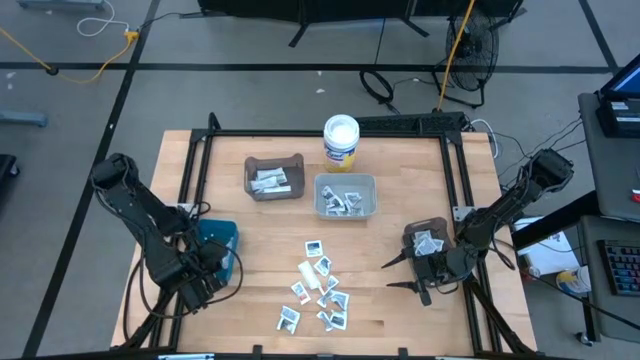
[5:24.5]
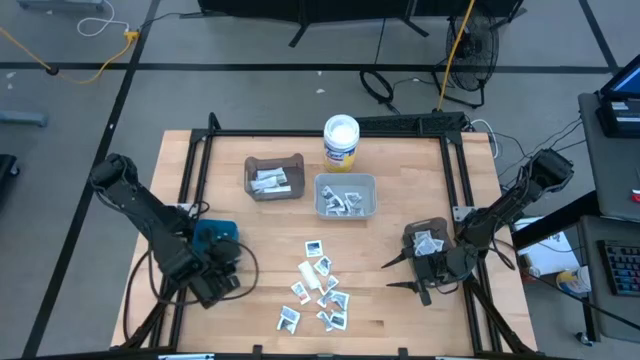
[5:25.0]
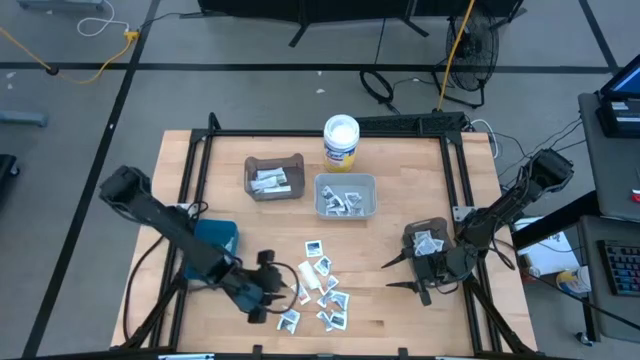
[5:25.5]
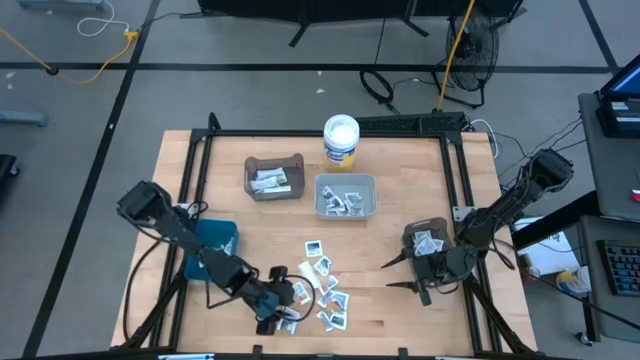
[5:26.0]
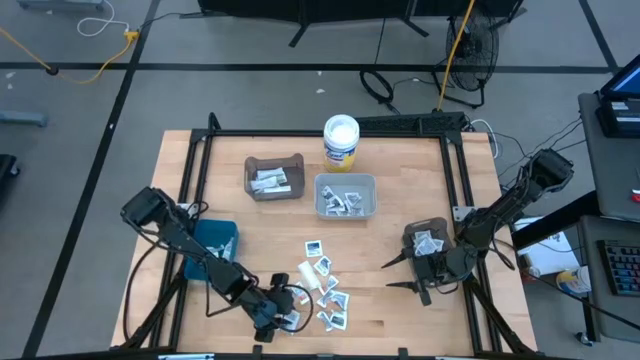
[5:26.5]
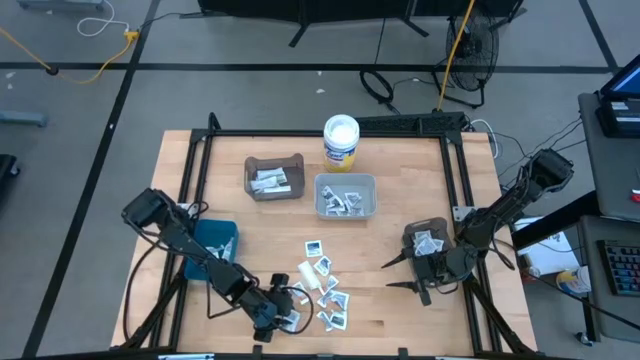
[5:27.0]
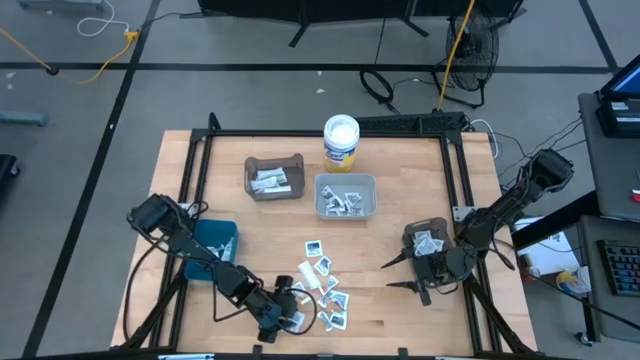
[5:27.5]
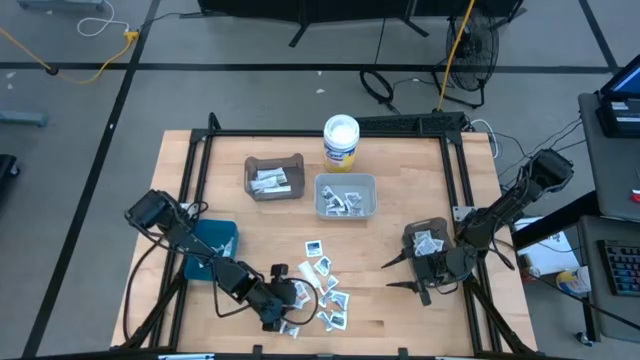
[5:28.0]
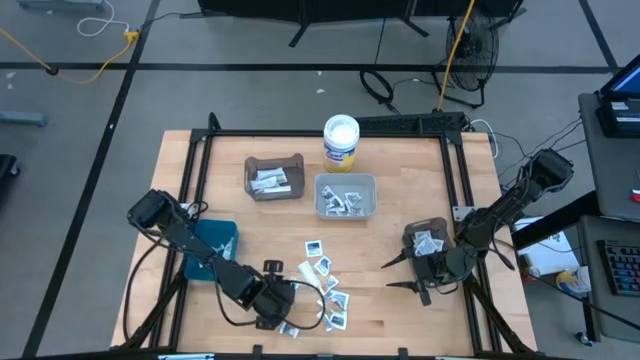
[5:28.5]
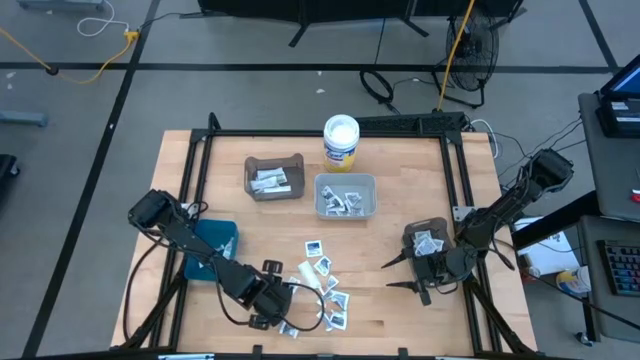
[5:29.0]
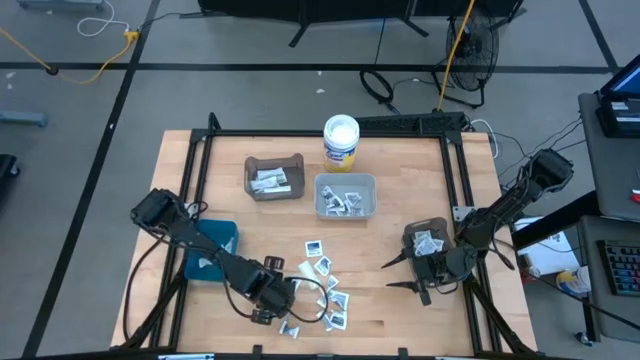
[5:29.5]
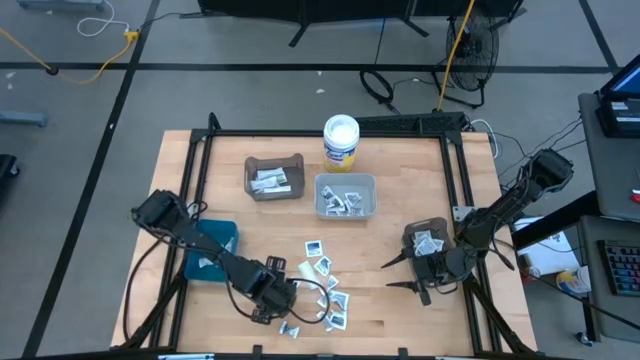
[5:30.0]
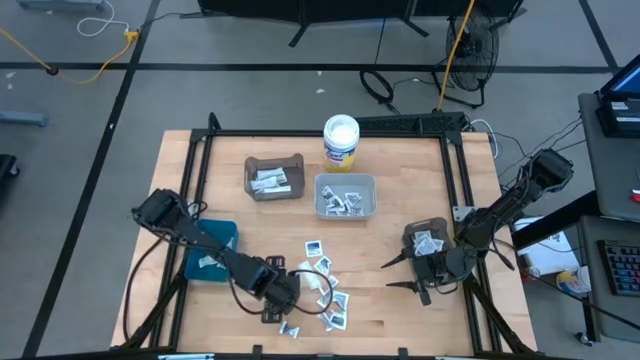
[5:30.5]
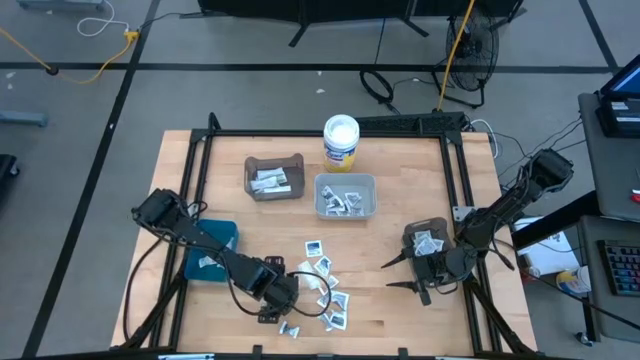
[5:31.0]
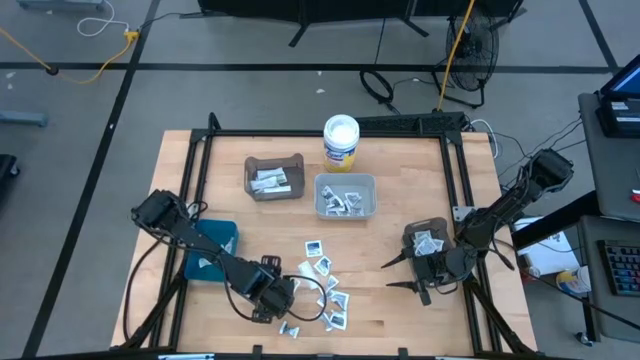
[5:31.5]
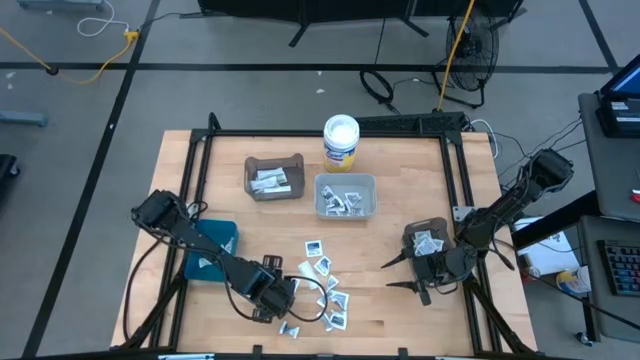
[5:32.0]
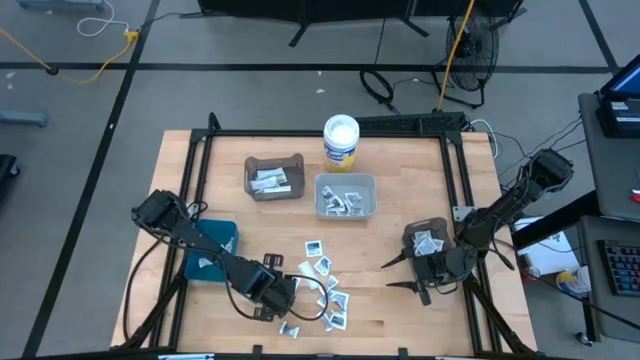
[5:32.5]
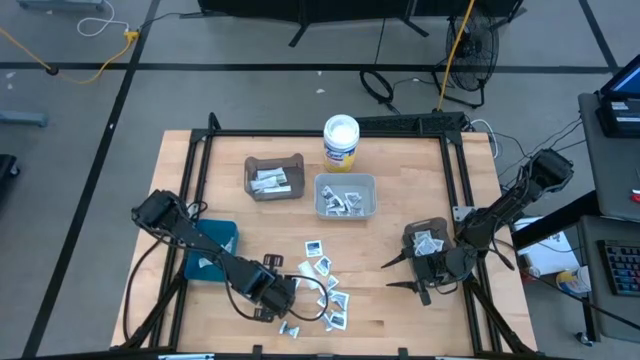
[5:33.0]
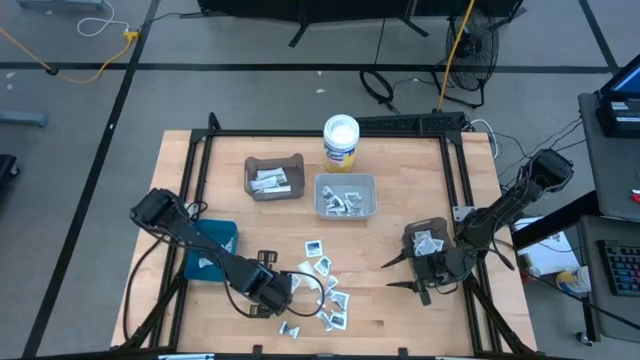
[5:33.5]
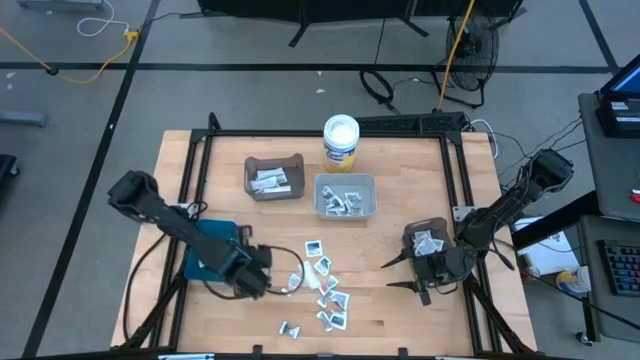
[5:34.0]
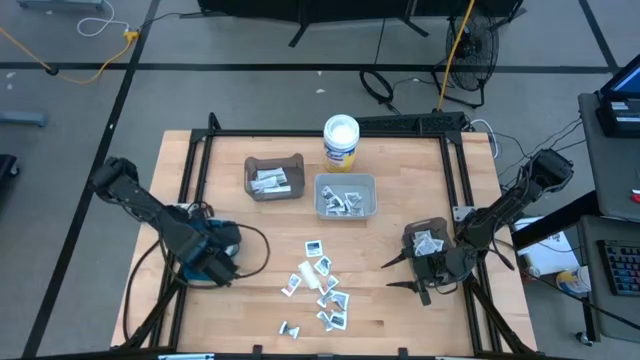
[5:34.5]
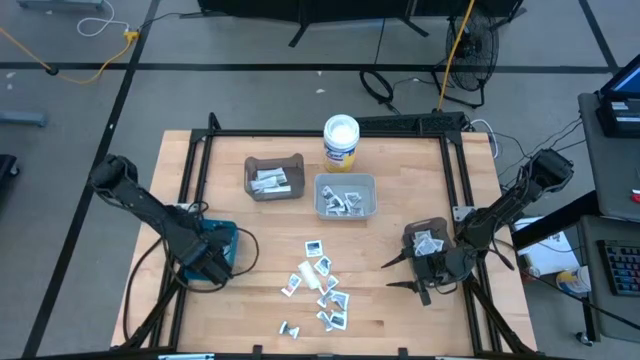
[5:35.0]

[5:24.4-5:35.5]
Task: Pick & Place First Aid Supplies
Put the orange ointment pack into the blue bin

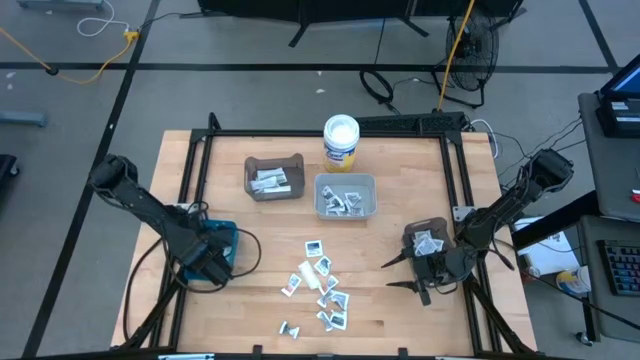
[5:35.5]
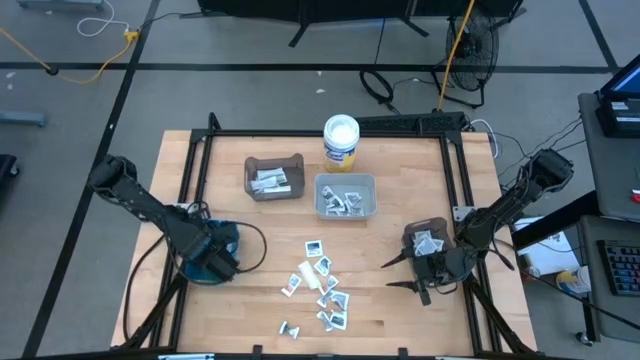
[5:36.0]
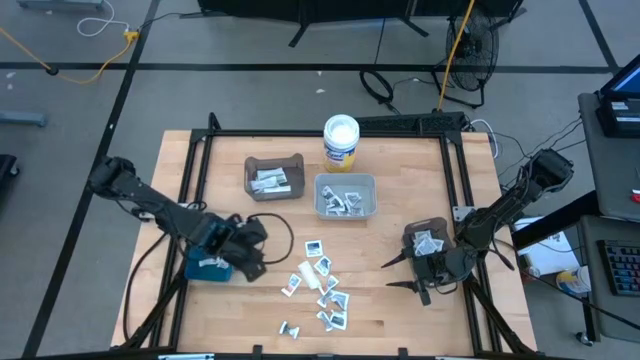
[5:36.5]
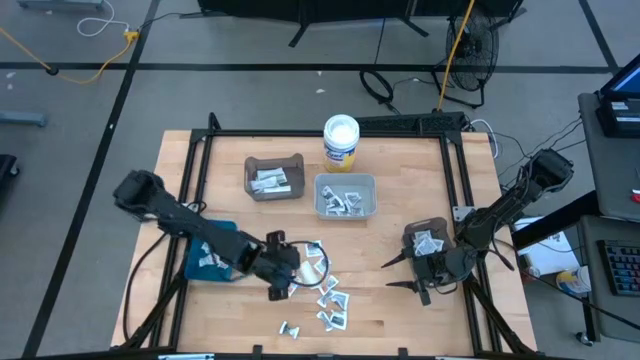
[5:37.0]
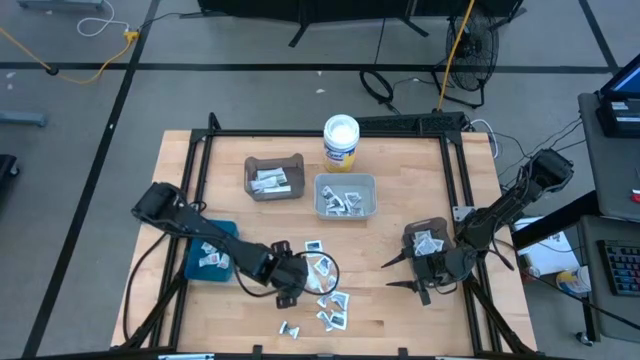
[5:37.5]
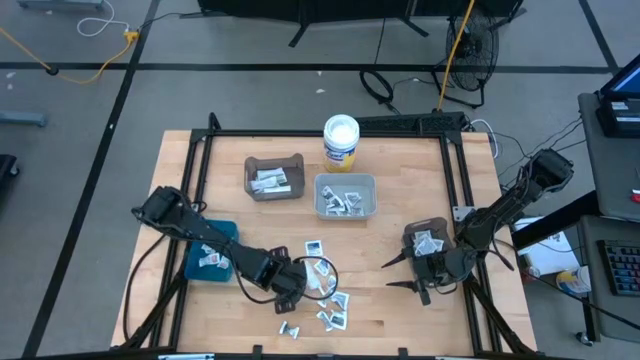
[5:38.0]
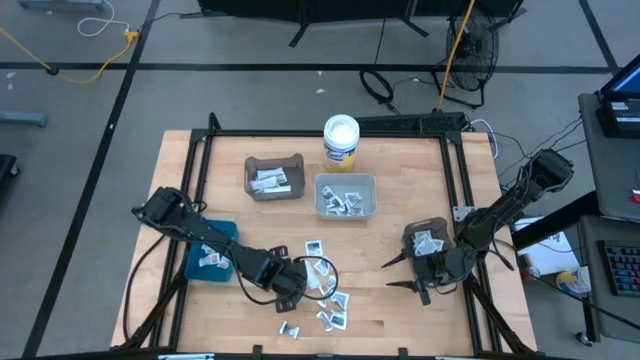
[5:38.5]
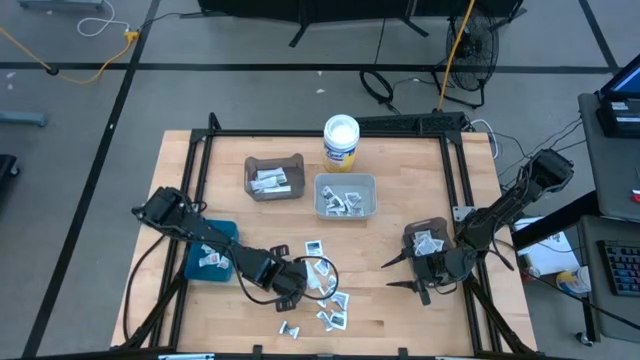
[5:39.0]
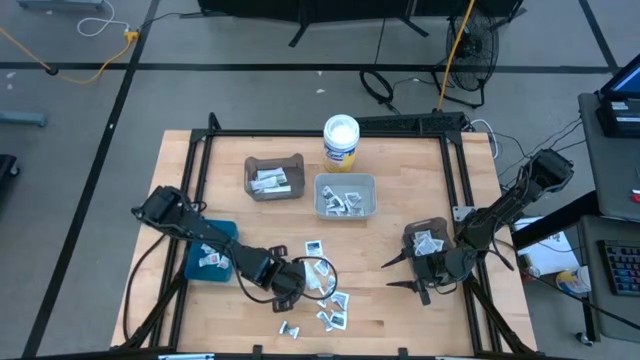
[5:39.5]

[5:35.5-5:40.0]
Put the orange ointment pack into the blue bin

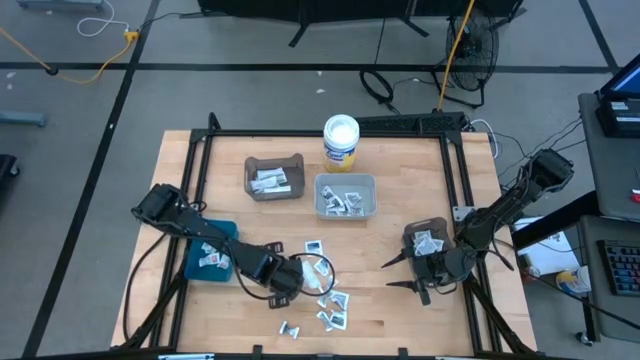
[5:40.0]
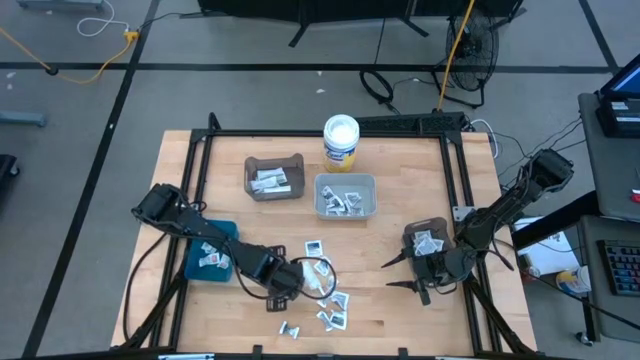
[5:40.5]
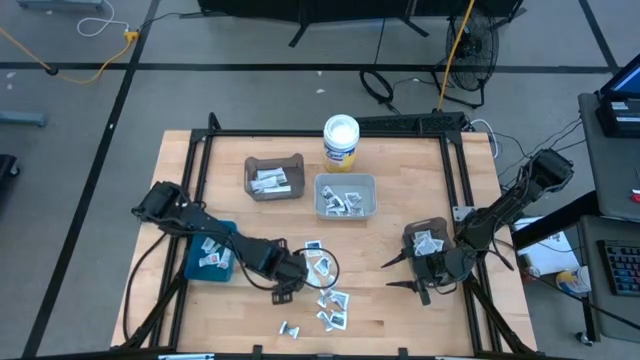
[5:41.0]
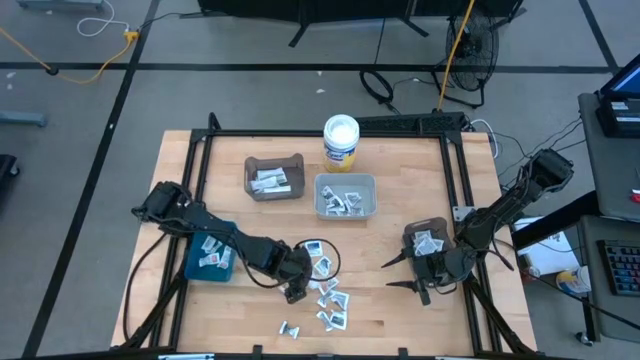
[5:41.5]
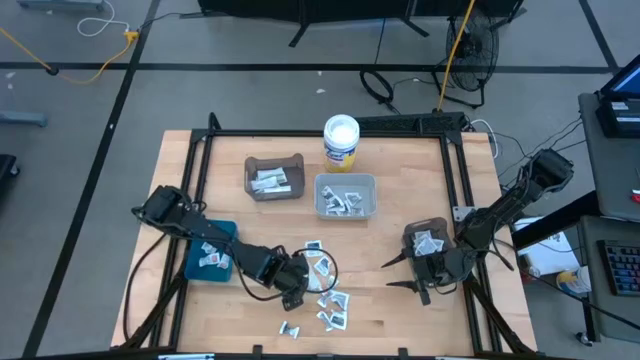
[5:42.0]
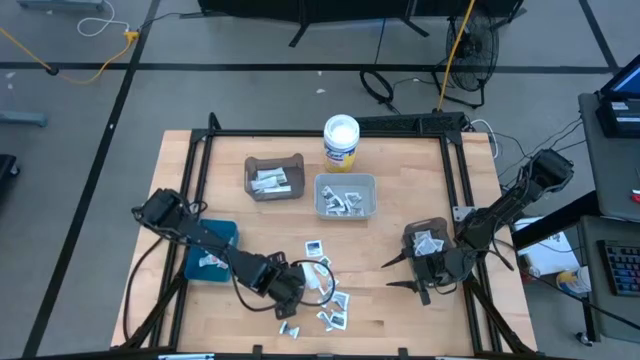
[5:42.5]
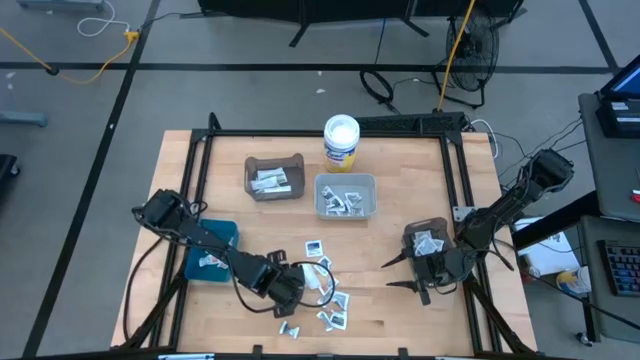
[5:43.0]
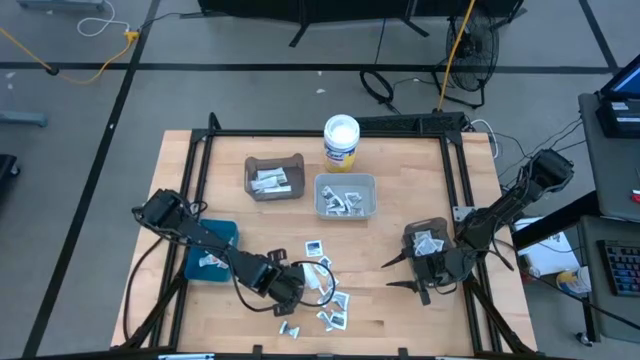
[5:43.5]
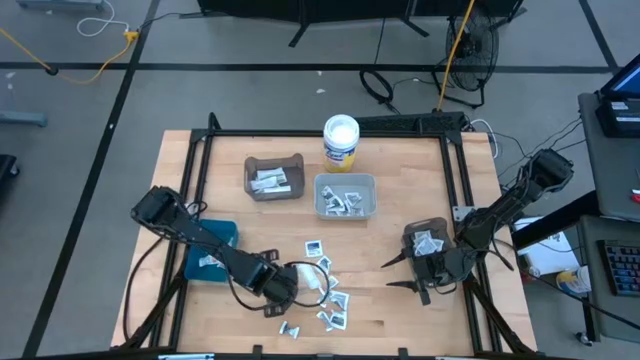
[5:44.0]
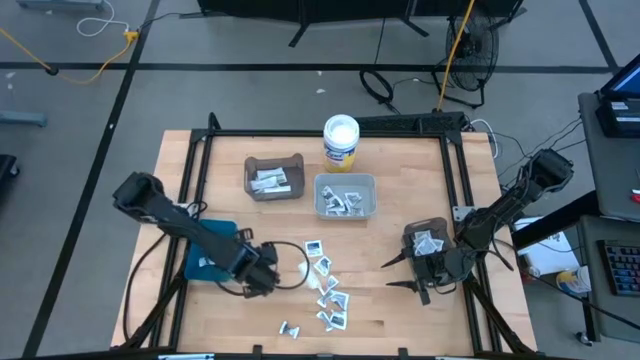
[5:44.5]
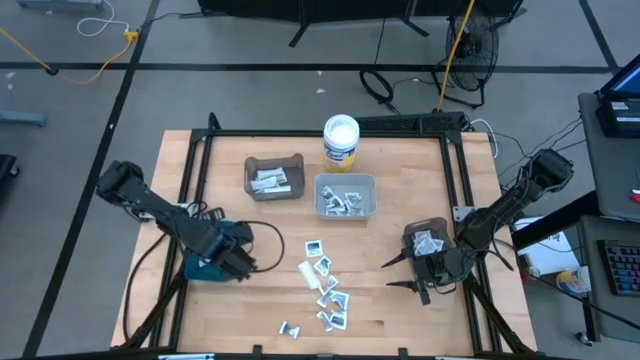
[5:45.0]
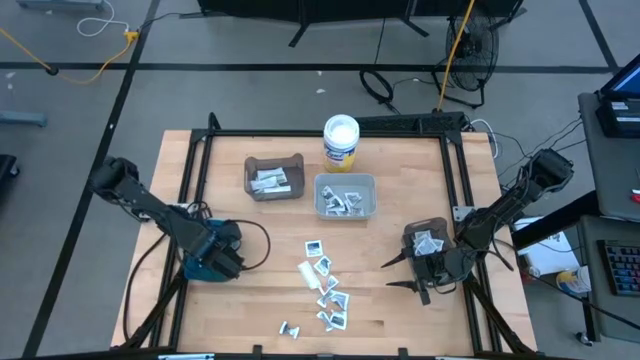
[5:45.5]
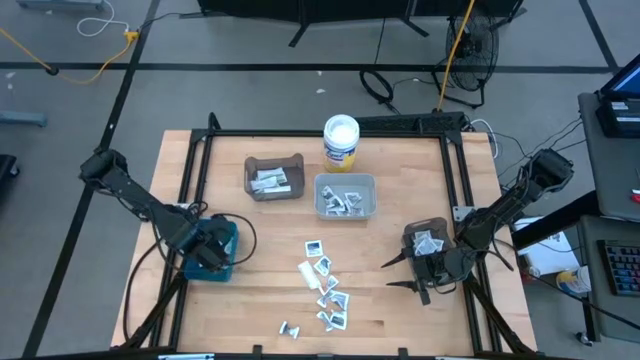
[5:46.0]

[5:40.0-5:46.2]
Put the orange ointment pack into the blue bin
